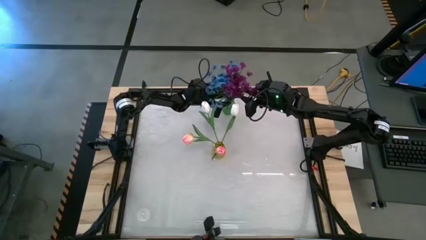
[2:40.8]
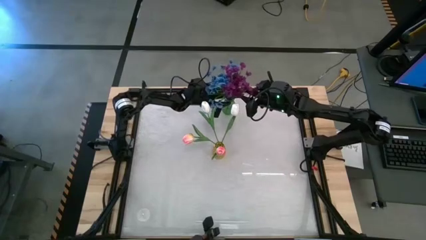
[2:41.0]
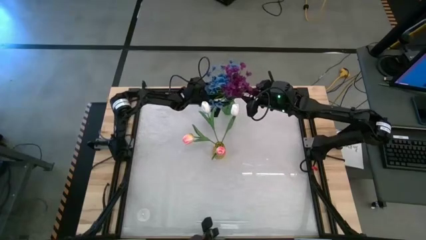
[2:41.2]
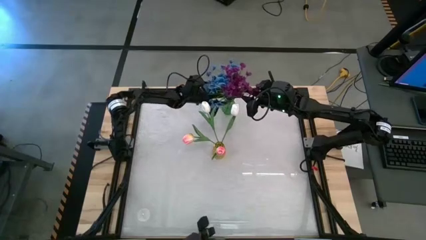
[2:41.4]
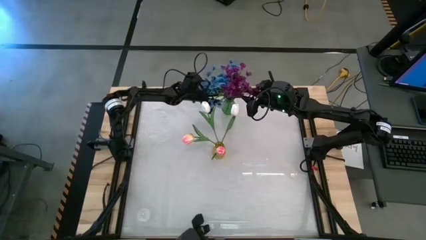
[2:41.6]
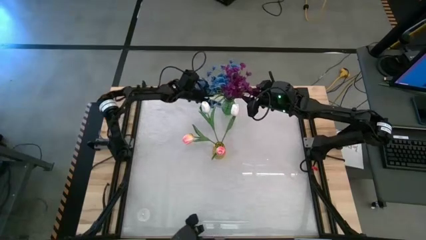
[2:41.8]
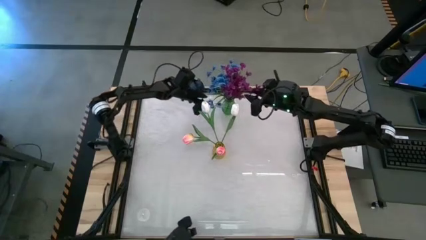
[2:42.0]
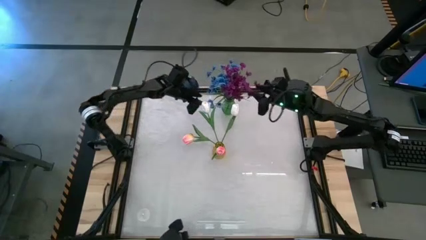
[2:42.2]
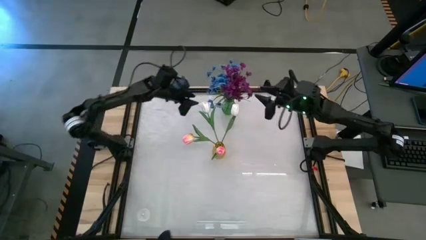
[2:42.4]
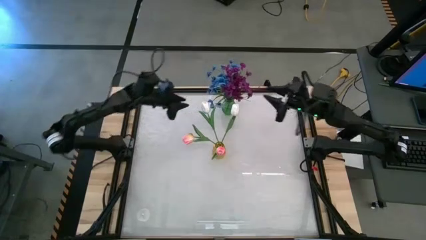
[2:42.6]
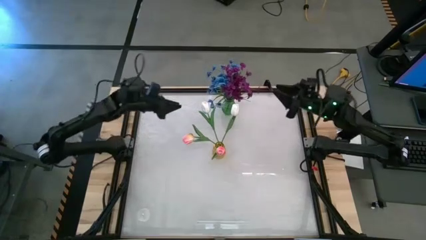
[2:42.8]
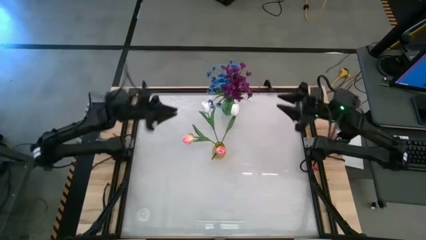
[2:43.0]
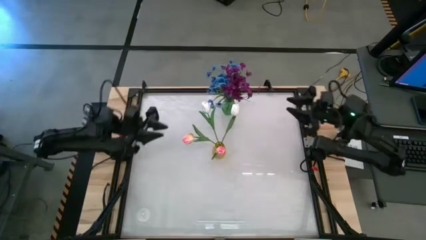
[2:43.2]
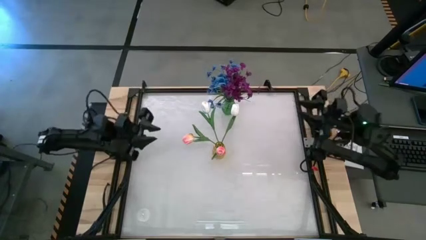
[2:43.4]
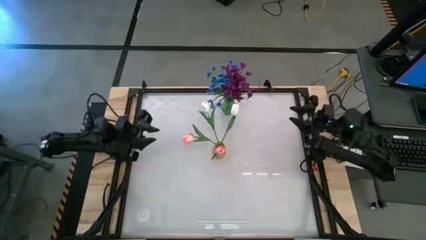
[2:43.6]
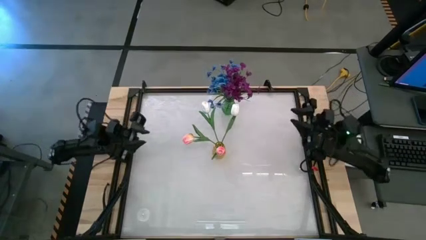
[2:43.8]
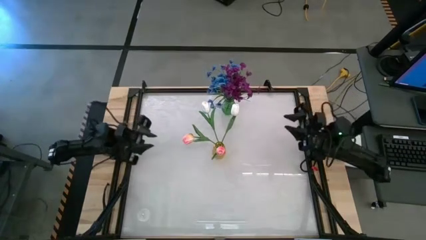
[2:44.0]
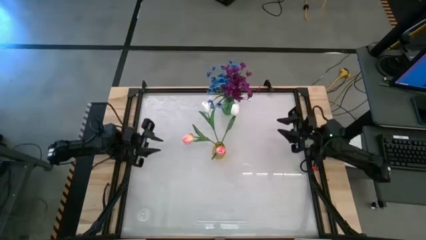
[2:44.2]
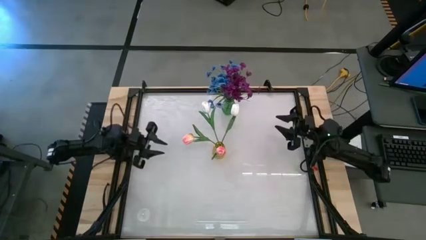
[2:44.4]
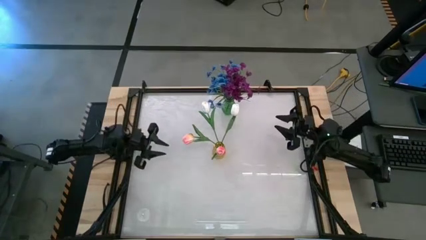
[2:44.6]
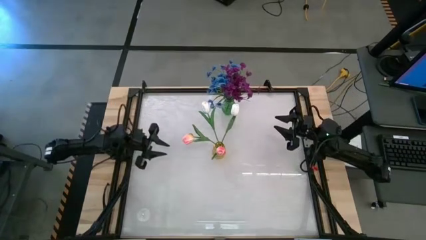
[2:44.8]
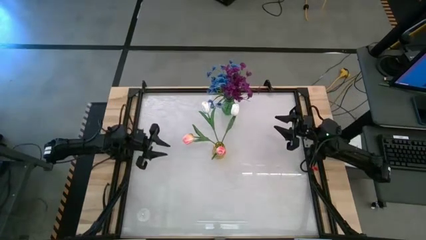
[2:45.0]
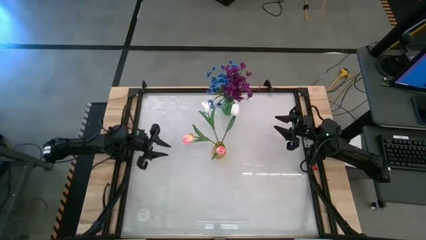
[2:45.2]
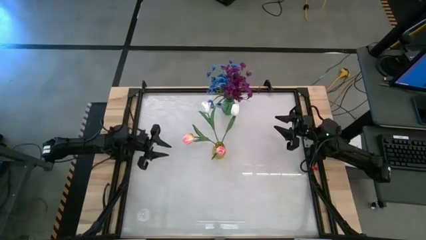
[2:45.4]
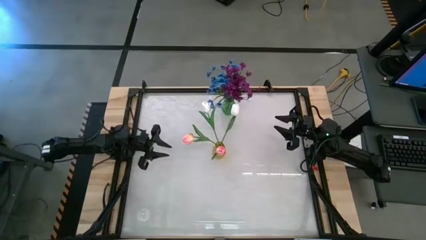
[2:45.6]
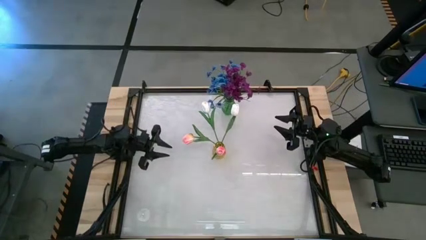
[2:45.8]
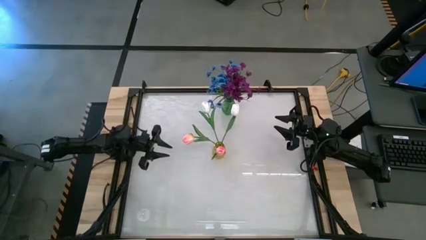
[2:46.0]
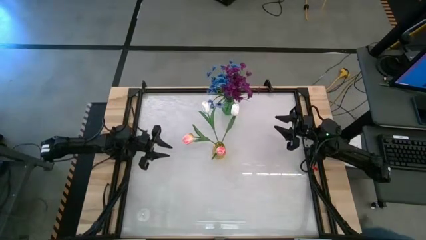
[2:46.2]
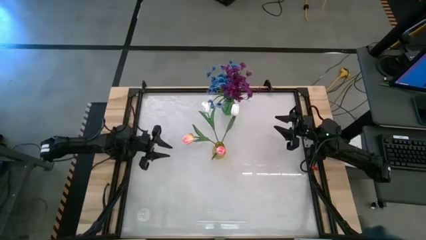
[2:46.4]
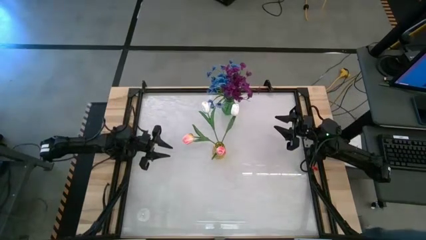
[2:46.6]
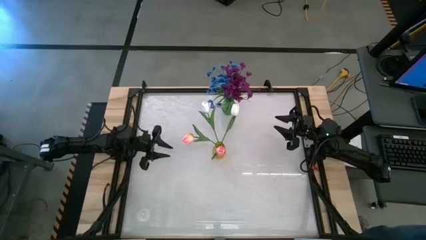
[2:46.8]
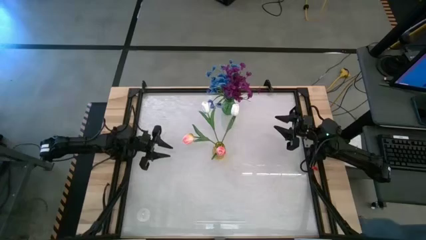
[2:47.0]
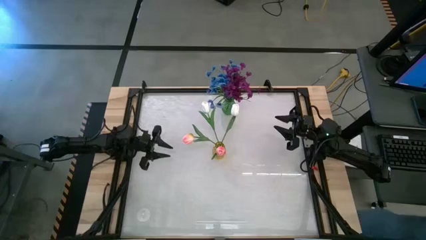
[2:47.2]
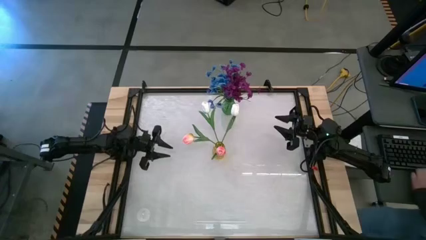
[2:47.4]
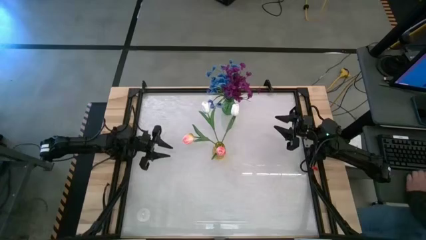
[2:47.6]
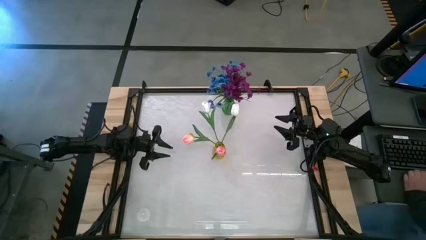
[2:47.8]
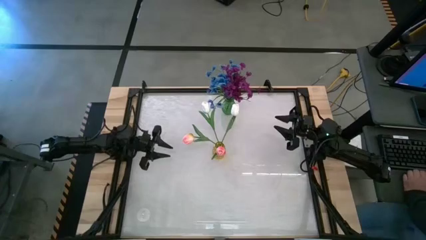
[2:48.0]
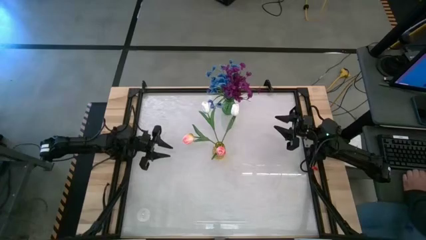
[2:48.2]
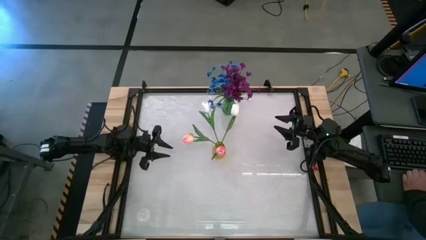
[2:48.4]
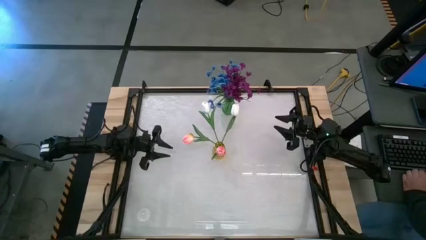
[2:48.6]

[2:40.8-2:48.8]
Task: Sort flowers into vase by color
Return to Home Position

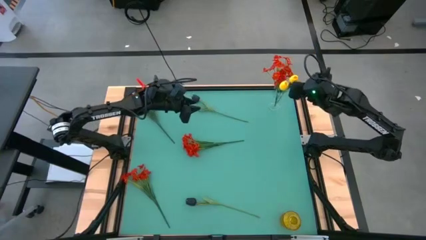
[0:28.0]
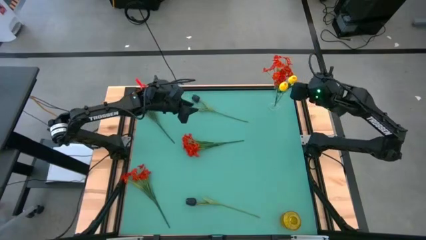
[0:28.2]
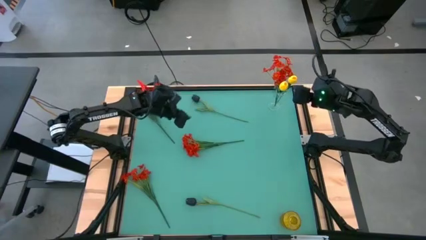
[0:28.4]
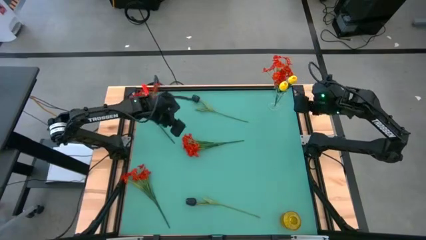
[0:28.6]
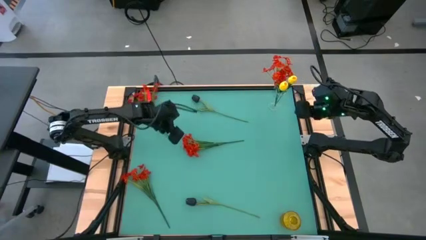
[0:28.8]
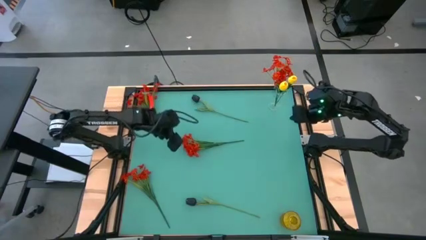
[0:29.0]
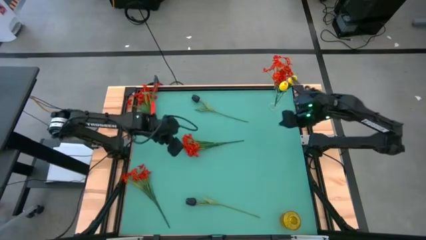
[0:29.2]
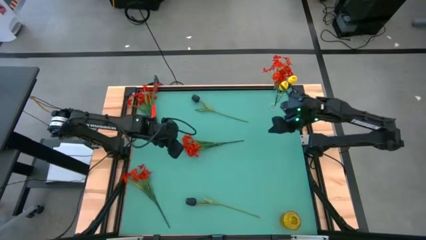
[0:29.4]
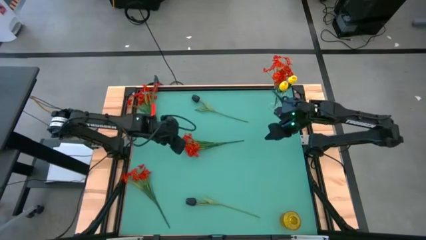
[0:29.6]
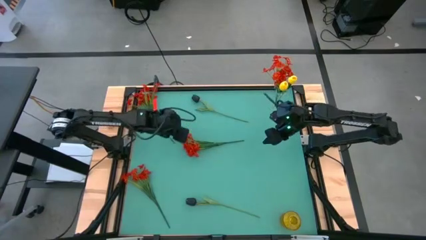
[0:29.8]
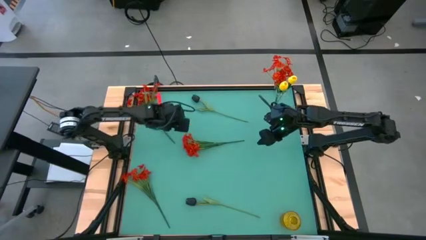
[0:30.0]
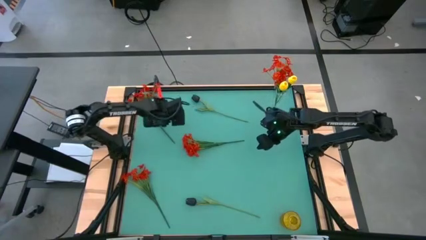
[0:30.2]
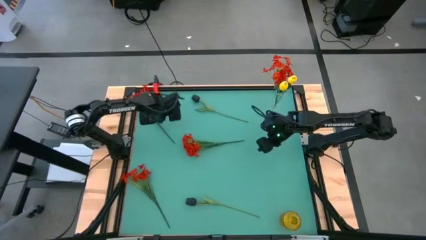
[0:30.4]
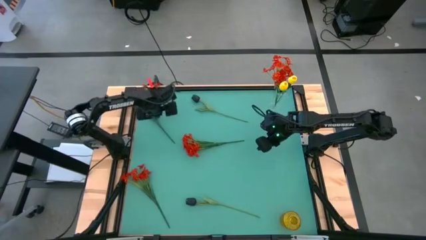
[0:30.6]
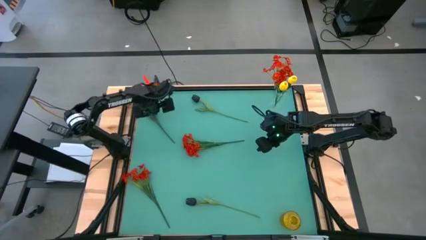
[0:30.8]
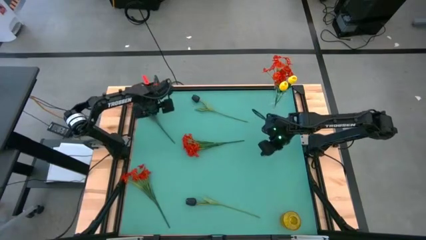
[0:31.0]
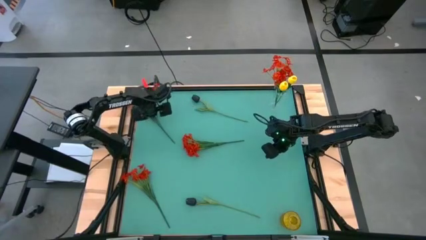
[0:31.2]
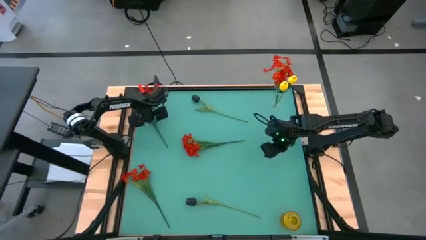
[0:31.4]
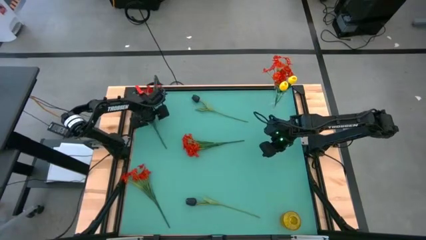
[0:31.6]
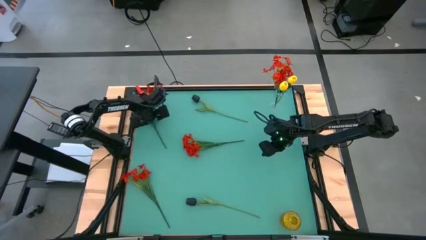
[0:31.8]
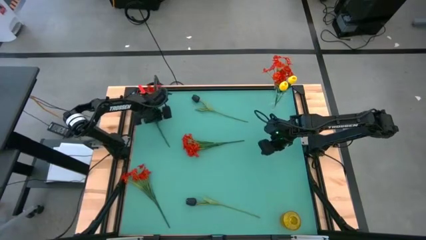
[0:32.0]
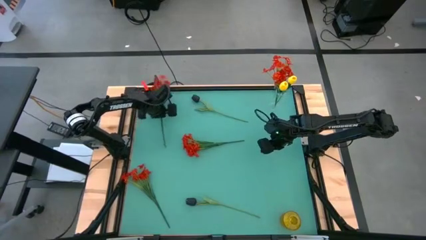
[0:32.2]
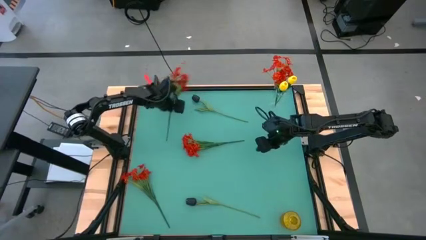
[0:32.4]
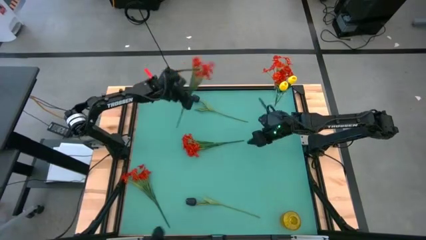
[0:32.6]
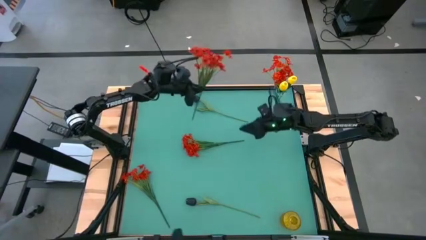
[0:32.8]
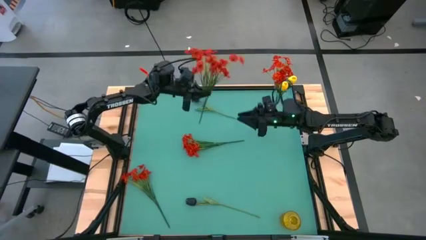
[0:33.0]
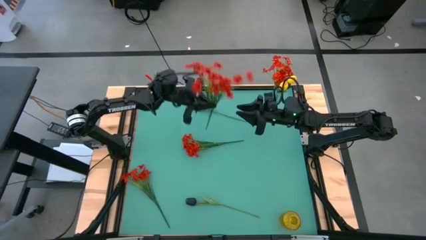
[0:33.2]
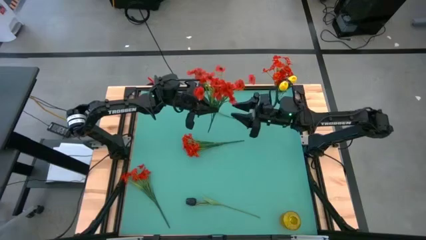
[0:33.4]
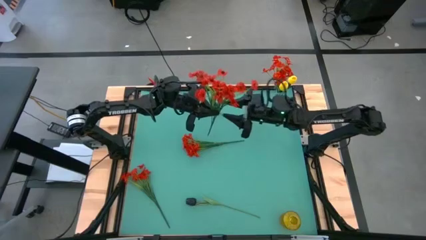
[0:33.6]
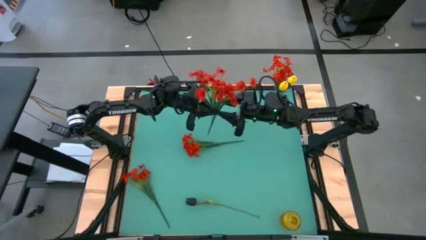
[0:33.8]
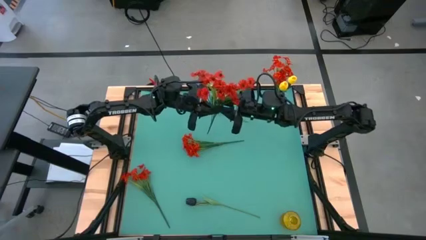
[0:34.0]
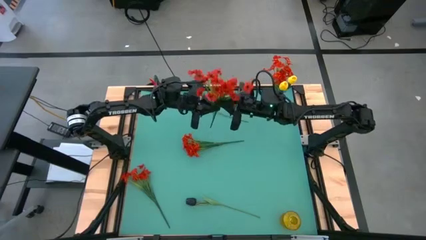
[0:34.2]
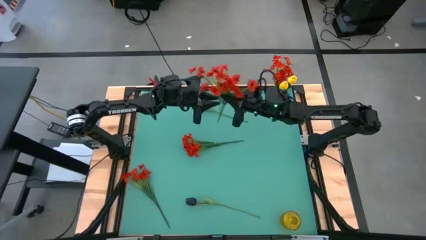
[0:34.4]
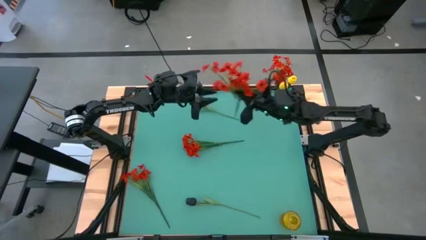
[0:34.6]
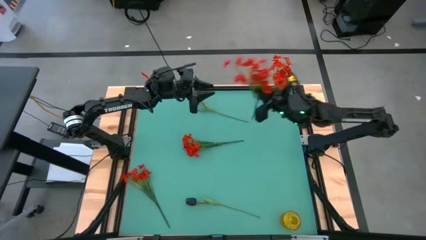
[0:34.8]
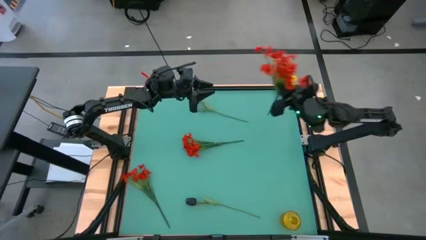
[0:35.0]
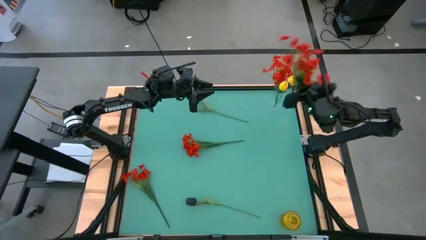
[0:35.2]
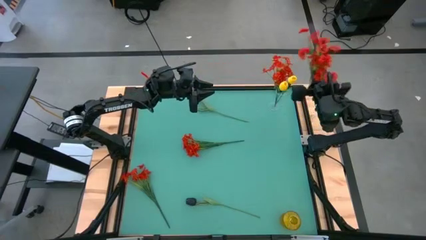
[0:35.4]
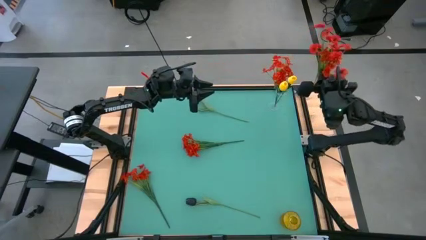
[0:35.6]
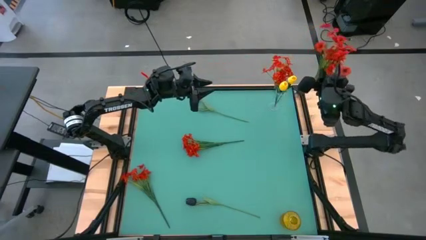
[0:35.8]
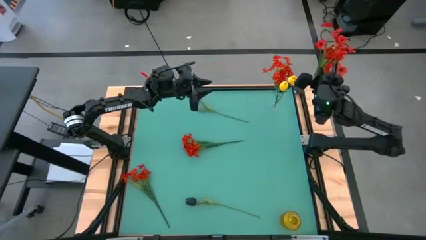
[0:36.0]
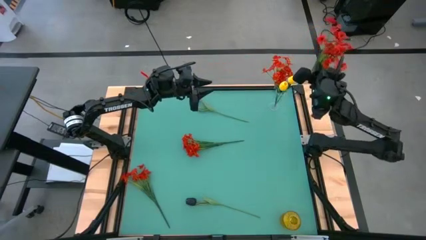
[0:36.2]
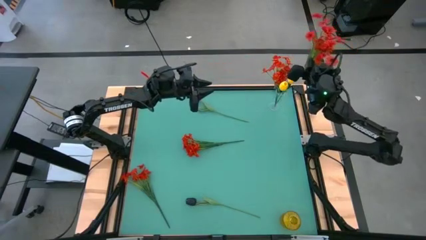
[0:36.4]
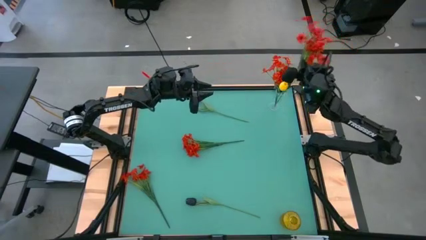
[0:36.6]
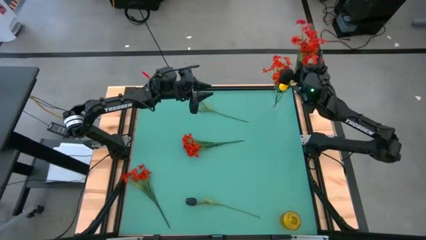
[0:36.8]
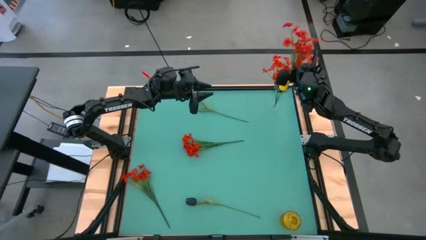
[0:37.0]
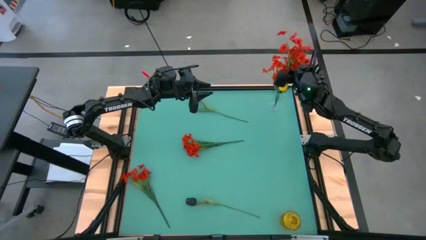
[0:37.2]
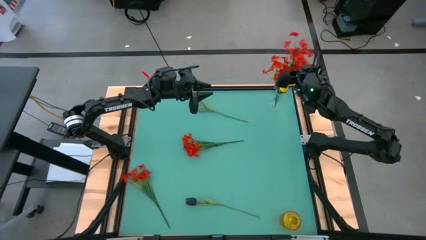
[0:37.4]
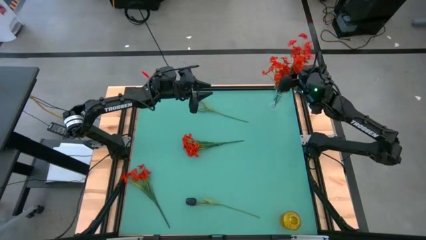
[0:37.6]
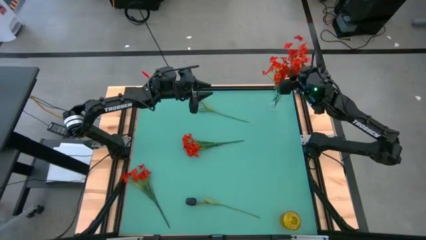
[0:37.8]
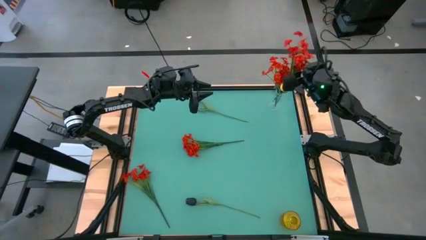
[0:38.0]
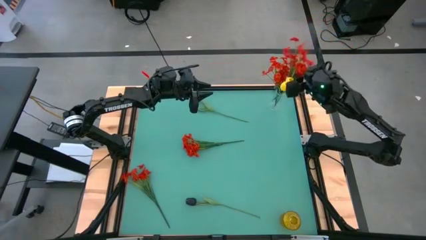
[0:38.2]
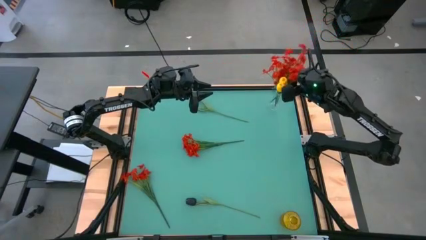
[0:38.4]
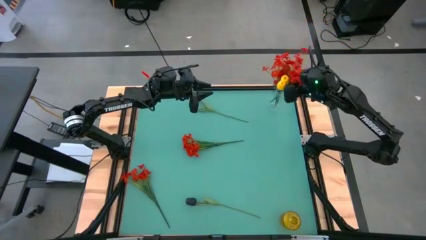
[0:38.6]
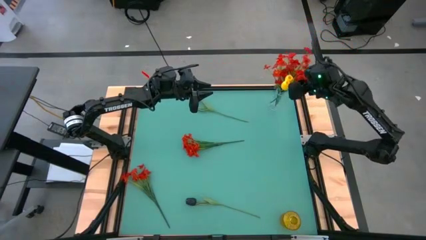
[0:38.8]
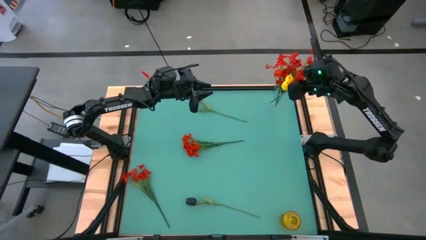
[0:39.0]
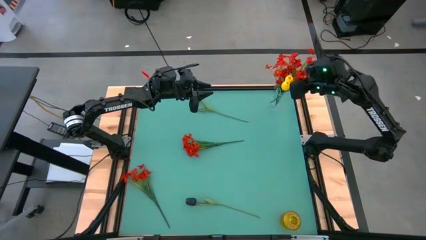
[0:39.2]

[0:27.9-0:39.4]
Task: Sort flowers into vase by color
Put the top red flowers into the transparent vase
